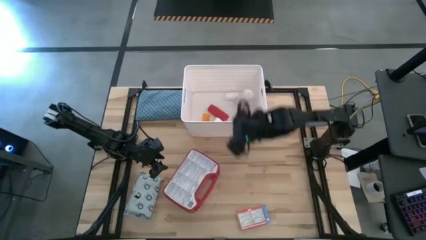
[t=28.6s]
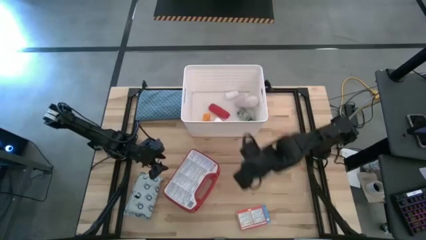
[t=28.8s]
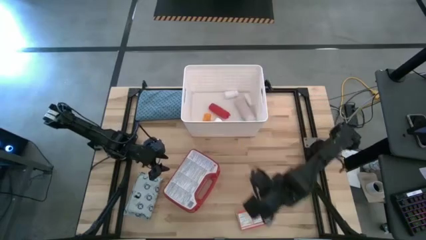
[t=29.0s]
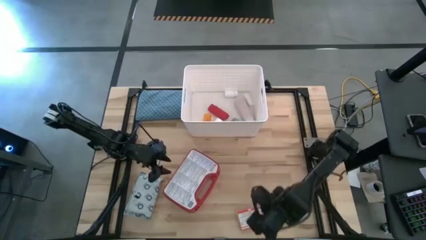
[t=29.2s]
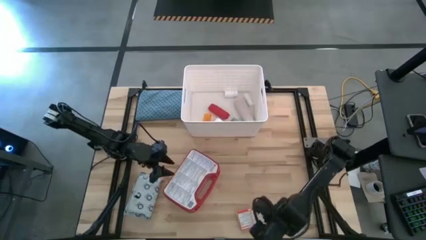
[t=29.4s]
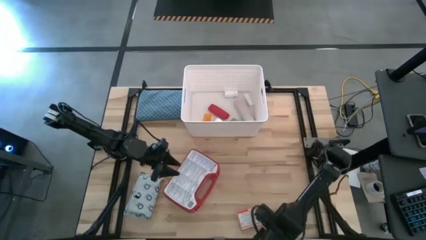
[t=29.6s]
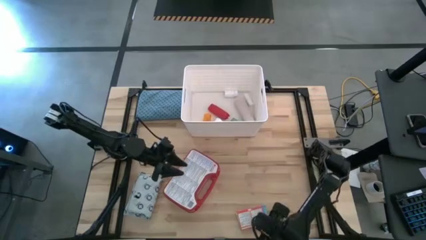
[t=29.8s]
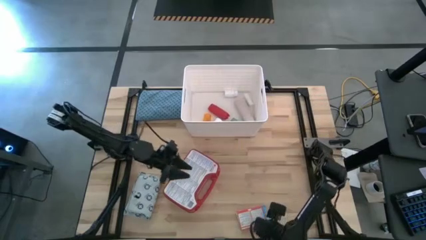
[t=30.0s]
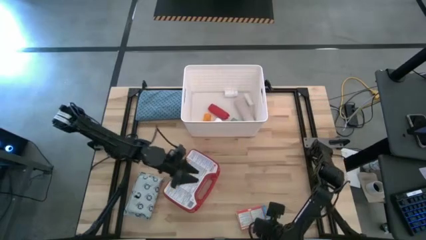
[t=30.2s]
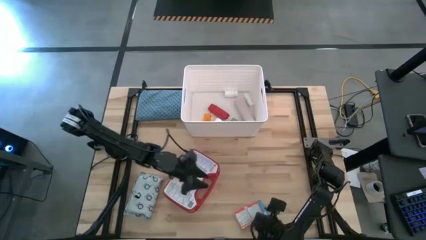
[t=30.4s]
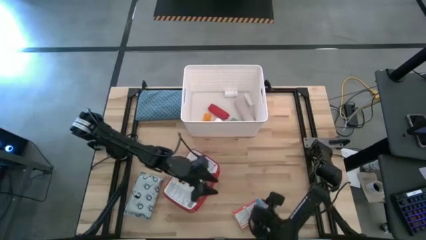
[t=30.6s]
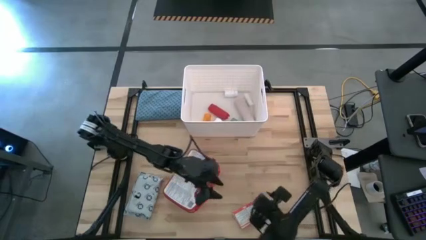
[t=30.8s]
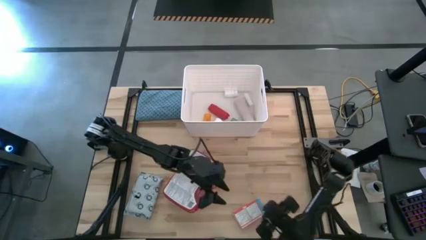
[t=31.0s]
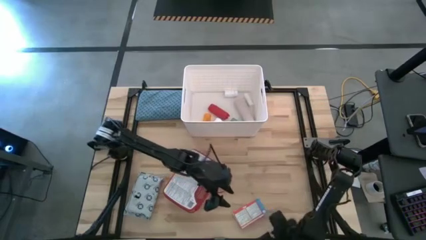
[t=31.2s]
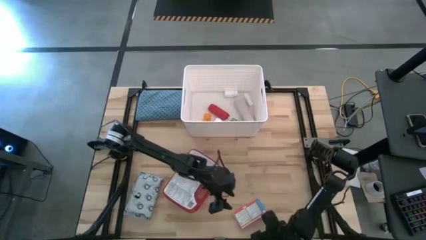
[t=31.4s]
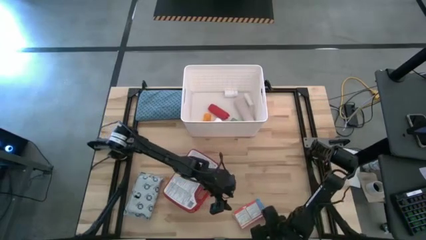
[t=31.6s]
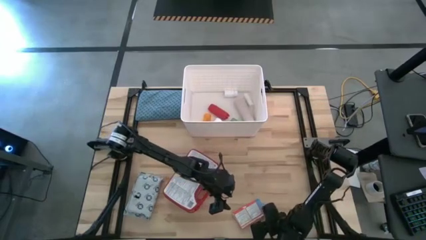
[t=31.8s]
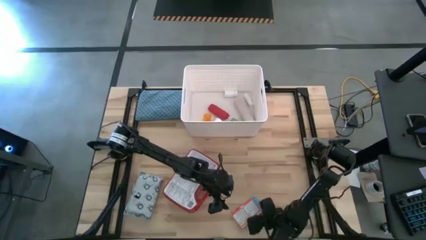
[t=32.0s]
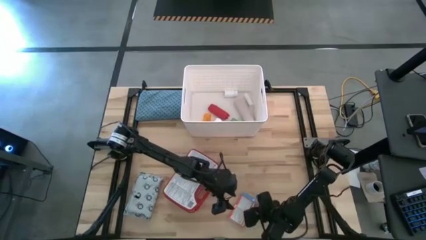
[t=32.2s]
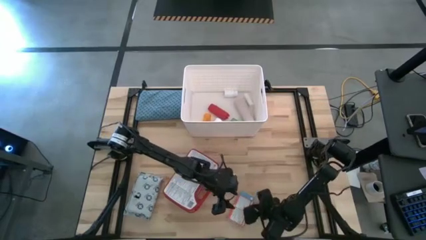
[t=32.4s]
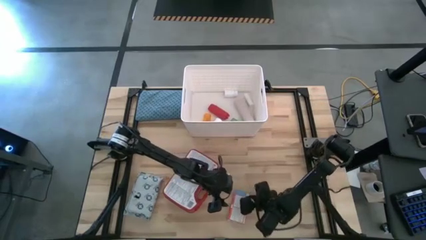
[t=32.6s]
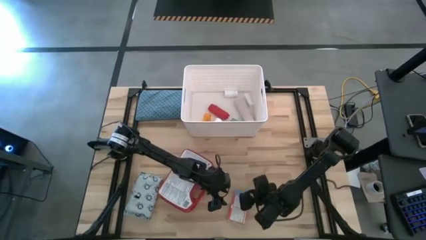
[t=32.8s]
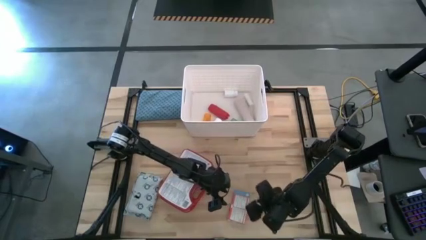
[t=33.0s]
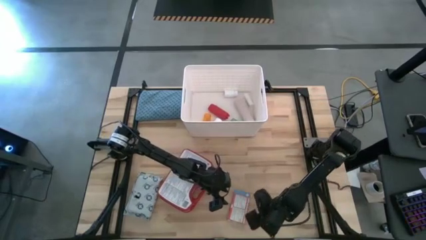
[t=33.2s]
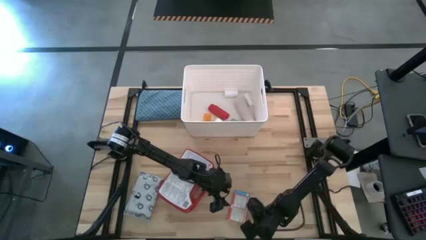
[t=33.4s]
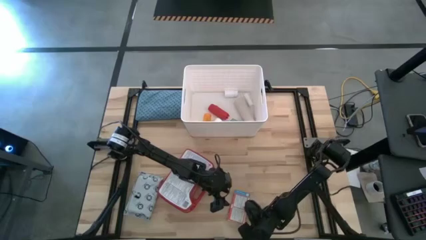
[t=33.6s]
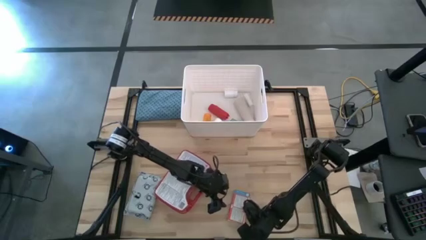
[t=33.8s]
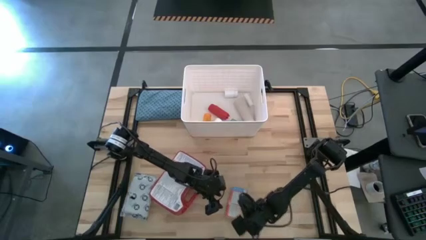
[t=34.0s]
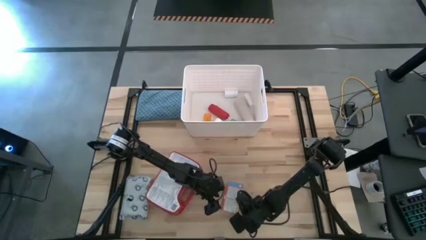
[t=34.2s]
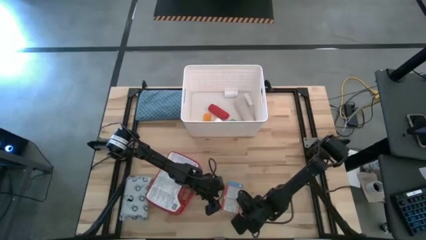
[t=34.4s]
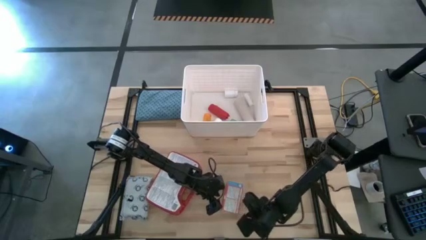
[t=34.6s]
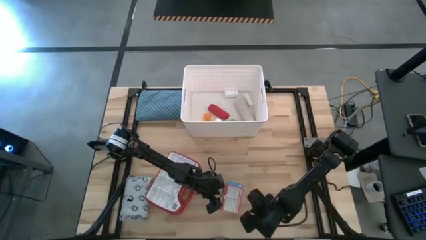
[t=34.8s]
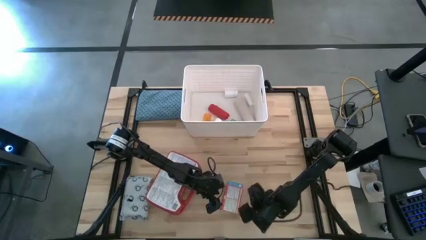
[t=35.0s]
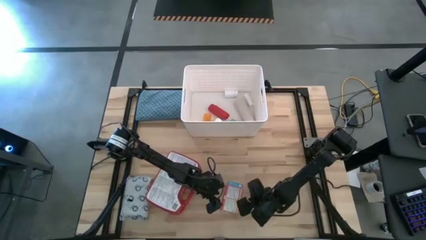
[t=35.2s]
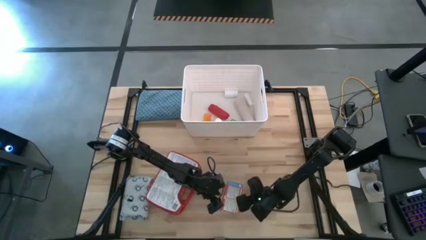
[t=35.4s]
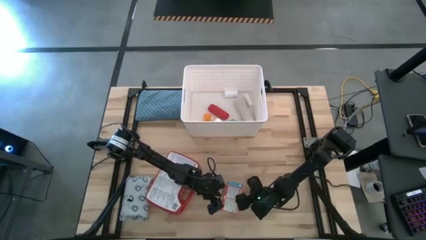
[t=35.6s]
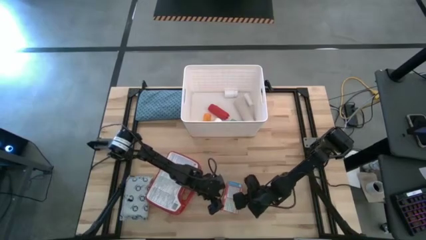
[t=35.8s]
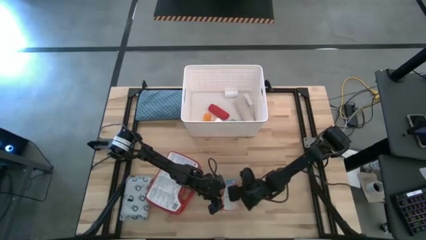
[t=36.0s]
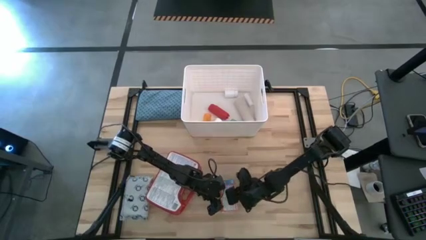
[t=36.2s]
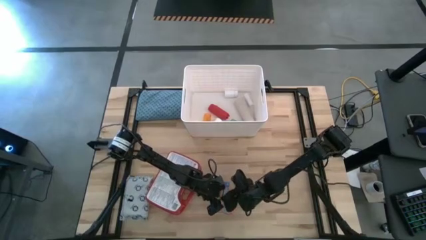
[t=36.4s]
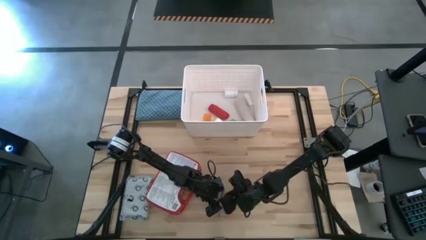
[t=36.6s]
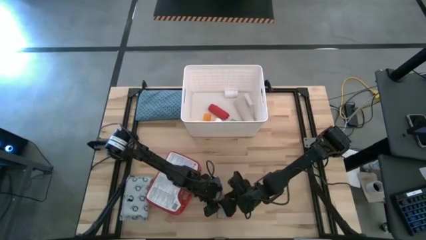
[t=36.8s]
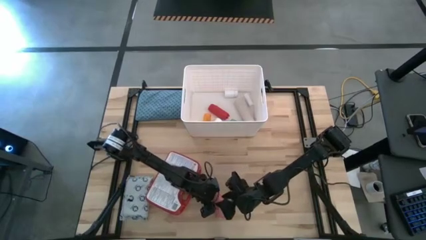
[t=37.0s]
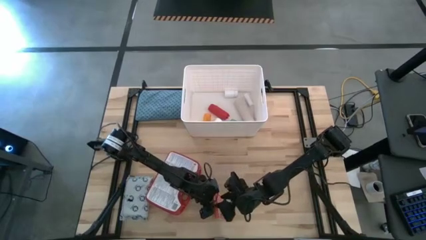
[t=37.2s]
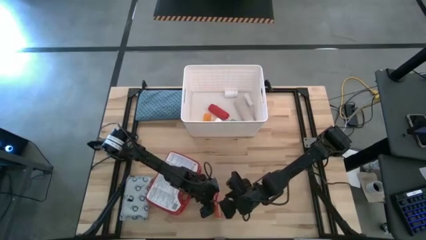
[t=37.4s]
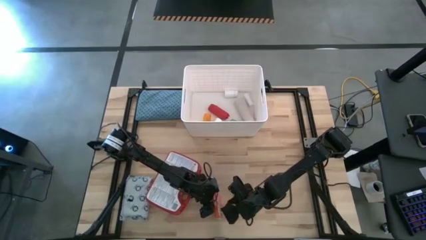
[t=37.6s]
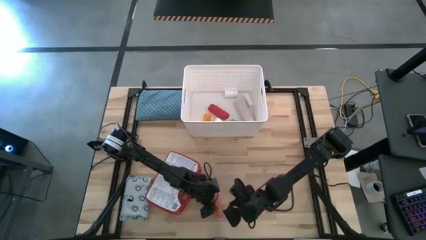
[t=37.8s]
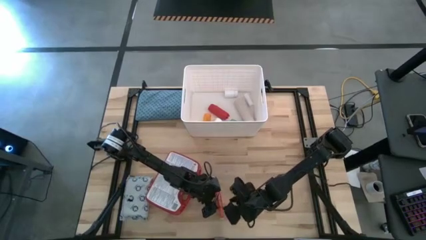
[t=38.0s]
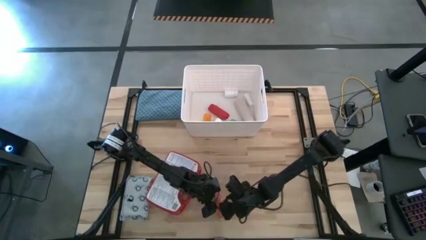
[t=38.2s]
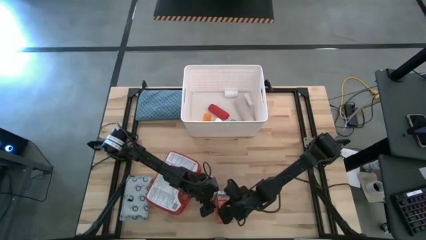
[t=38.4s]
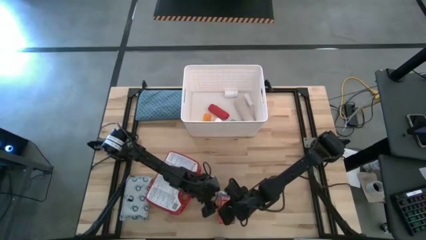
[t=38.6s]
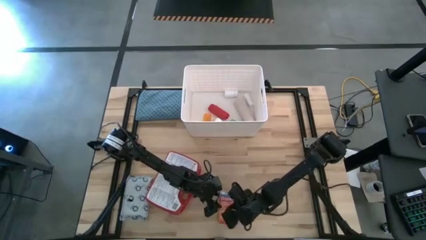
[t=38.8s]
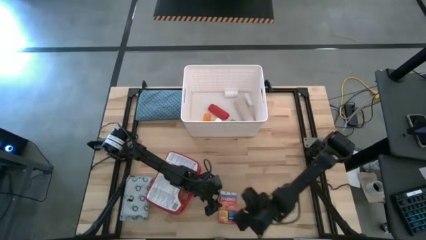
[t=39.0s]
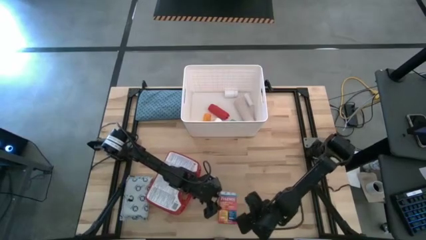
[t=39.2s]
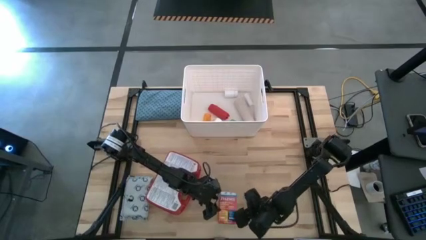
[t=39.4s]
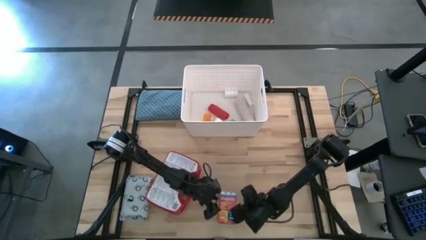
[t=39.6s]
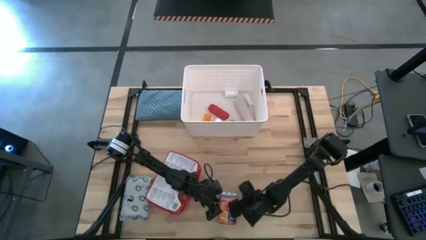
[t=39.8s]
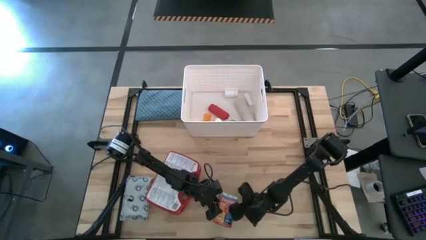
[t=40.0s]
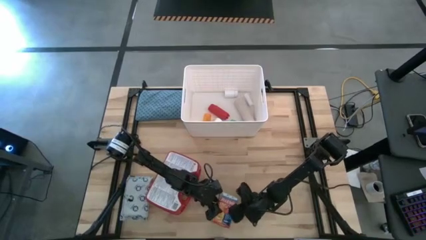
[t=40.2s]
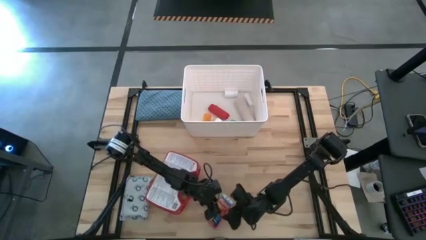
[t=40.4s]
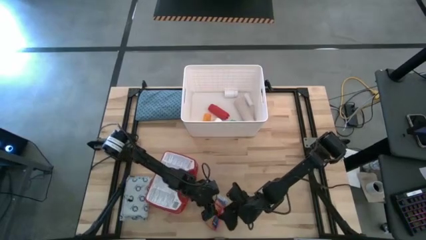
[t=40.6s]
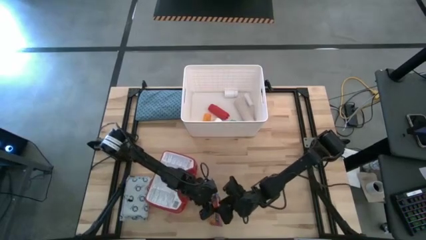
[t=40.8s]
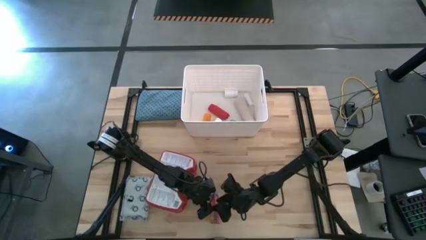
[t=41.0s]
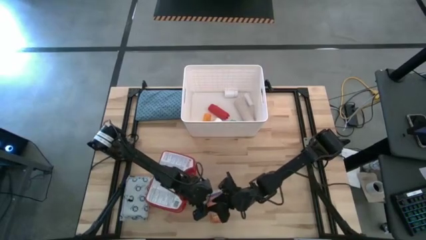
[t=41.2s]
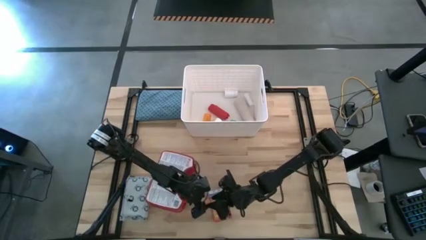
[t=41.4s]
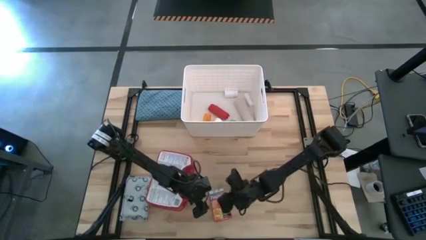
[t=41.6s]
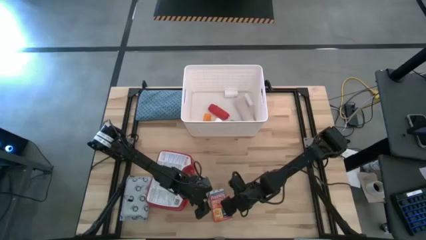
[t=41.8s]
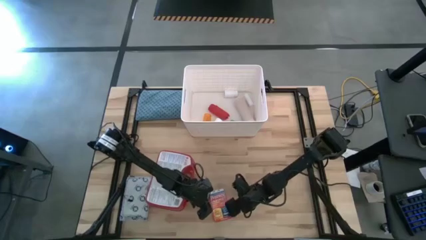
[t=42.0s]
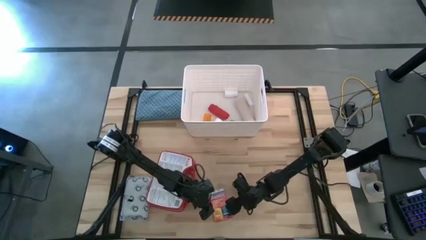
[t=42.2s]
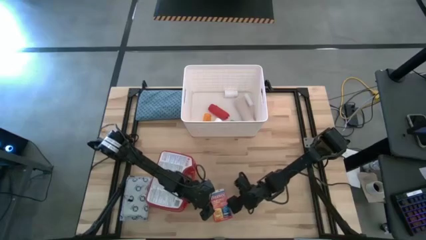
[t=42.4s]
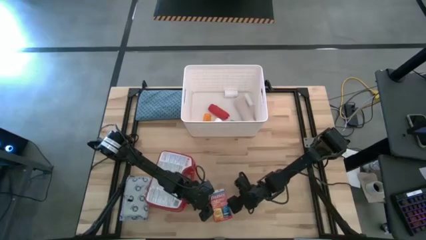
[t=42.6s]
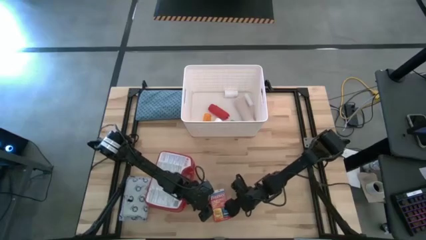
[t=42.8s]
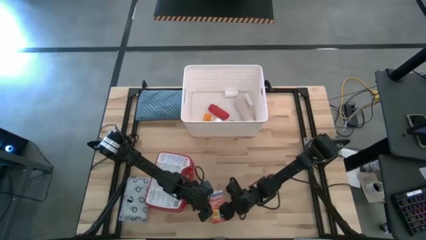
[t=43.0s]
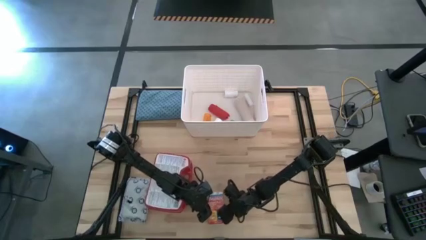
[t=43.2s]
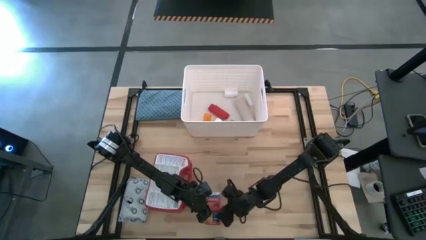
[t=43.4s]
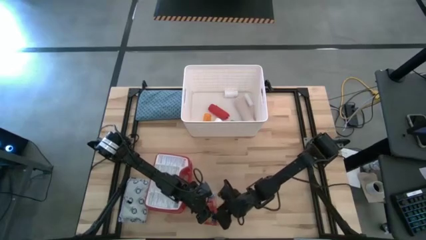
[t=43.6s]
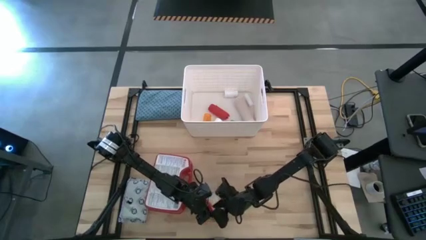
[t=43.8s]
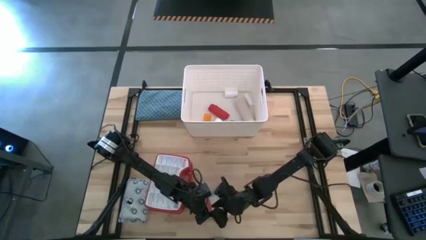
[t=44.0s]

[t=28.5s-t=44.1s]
Task: Pick & place medical supplies in basket/bin
Put the red medicine box into the white bin
